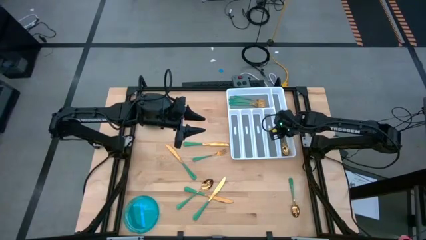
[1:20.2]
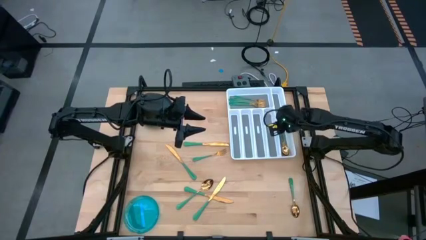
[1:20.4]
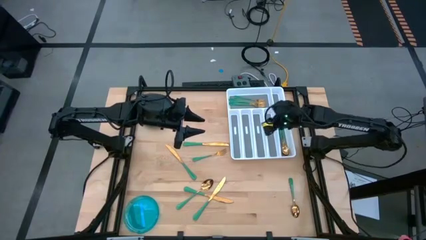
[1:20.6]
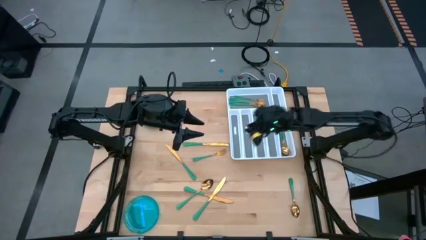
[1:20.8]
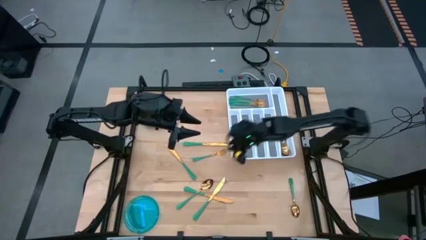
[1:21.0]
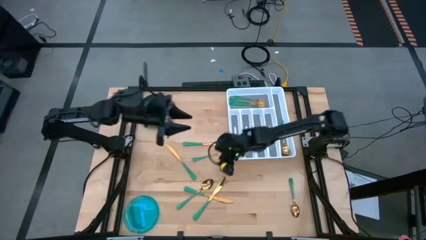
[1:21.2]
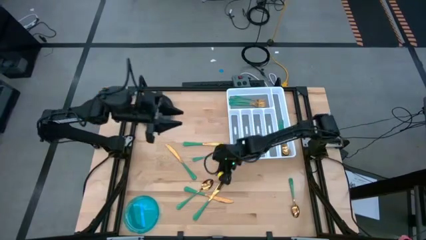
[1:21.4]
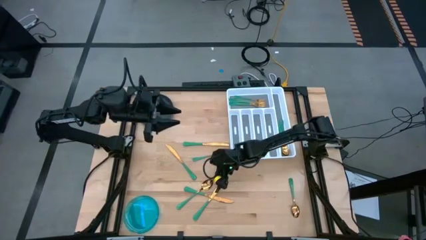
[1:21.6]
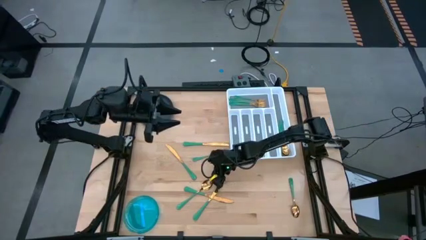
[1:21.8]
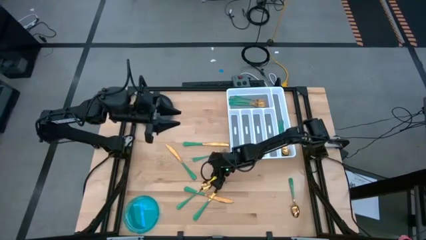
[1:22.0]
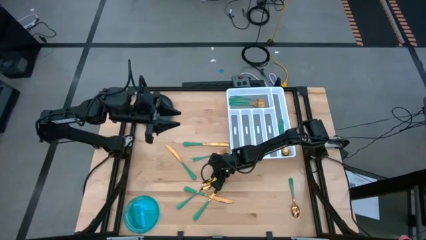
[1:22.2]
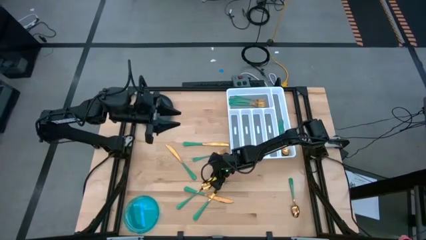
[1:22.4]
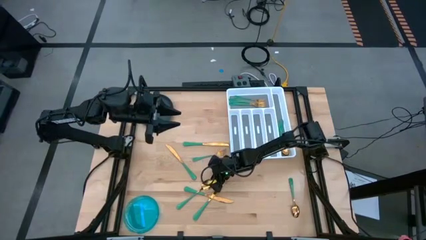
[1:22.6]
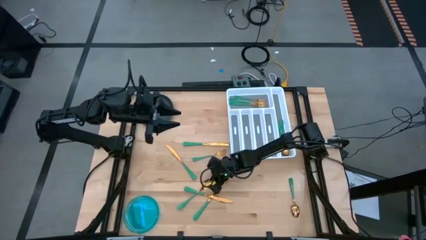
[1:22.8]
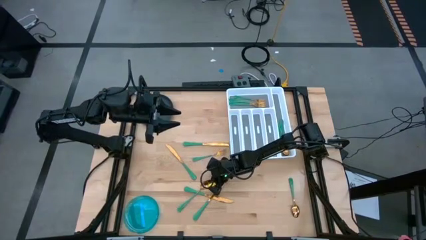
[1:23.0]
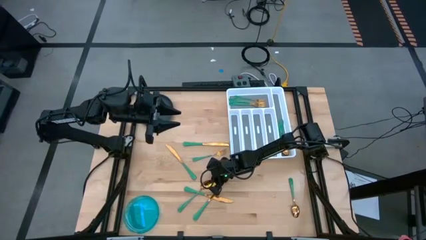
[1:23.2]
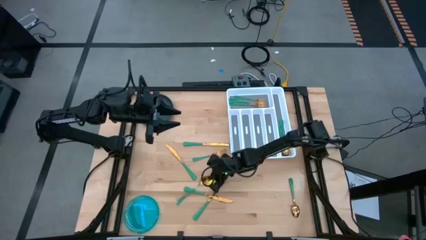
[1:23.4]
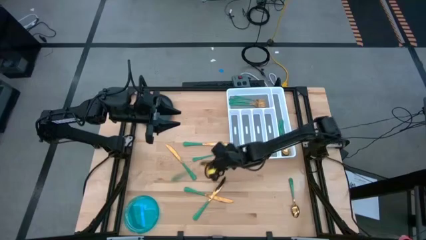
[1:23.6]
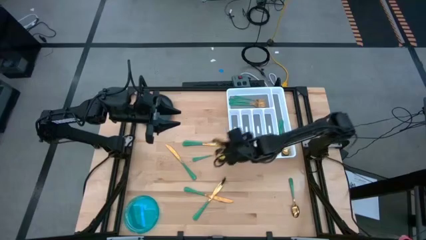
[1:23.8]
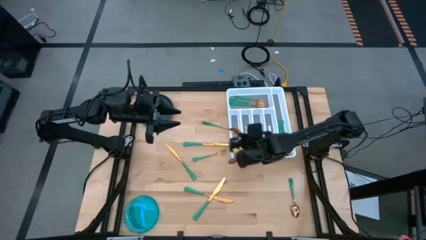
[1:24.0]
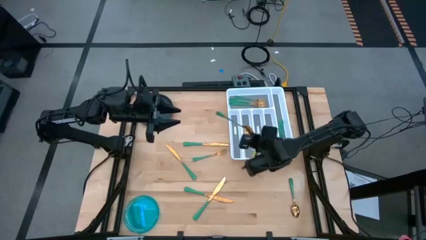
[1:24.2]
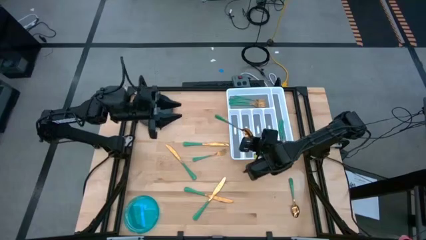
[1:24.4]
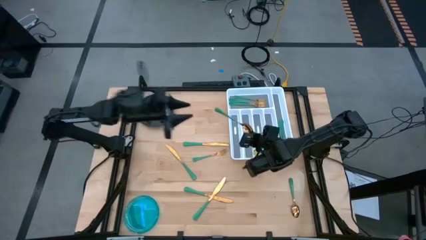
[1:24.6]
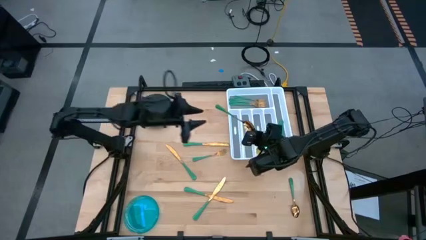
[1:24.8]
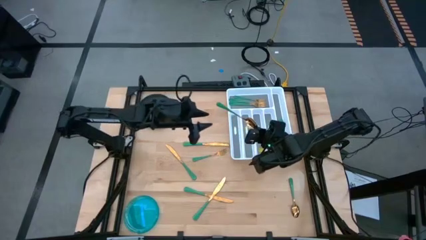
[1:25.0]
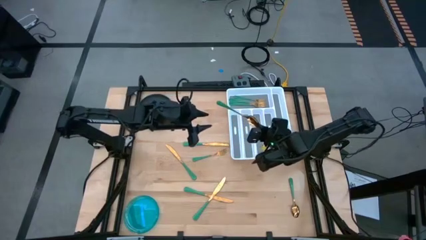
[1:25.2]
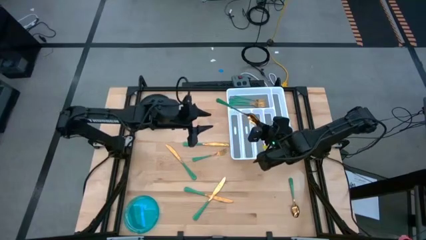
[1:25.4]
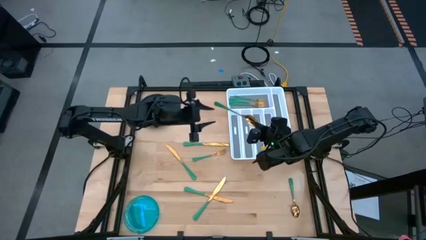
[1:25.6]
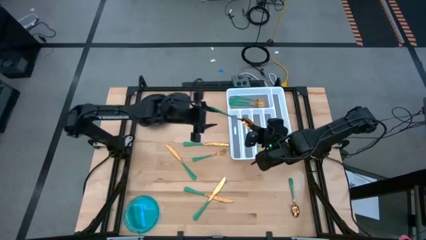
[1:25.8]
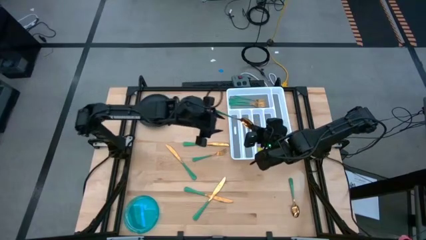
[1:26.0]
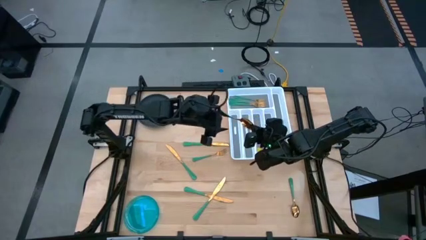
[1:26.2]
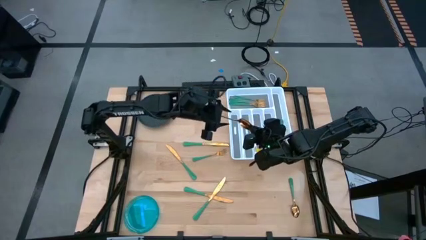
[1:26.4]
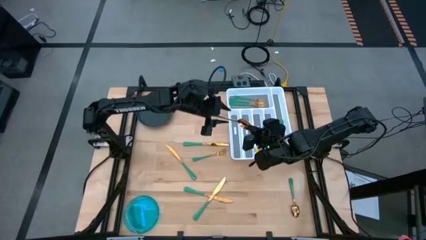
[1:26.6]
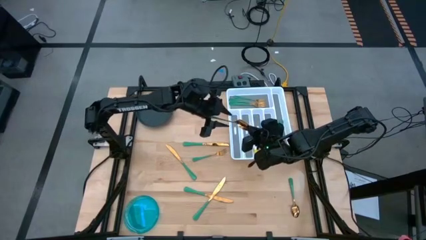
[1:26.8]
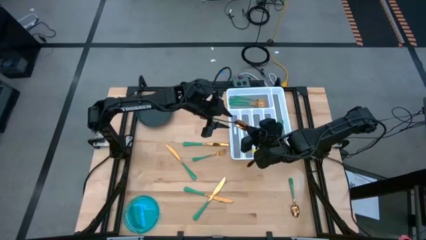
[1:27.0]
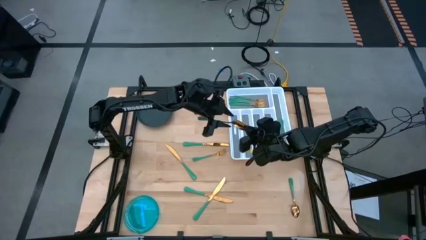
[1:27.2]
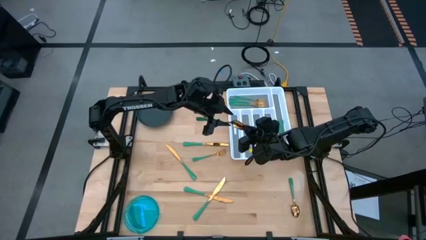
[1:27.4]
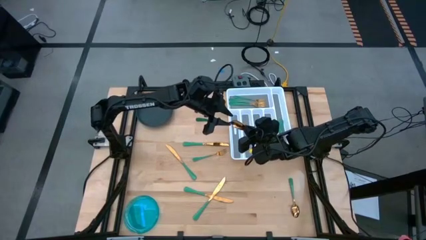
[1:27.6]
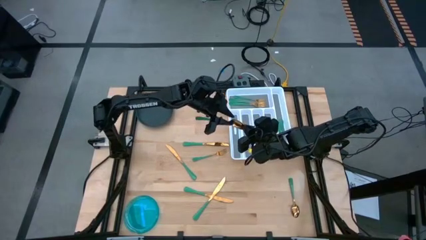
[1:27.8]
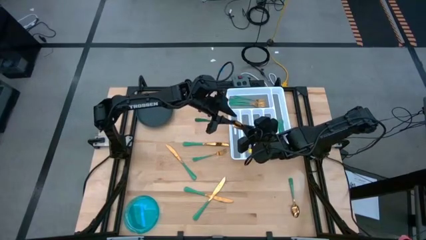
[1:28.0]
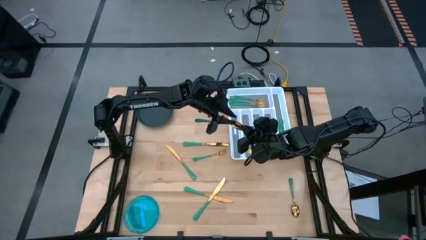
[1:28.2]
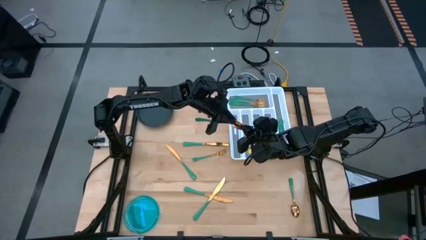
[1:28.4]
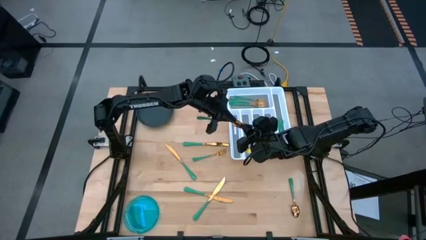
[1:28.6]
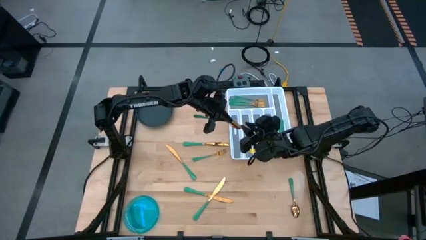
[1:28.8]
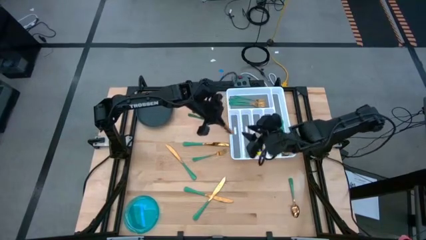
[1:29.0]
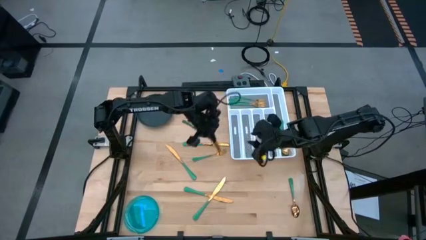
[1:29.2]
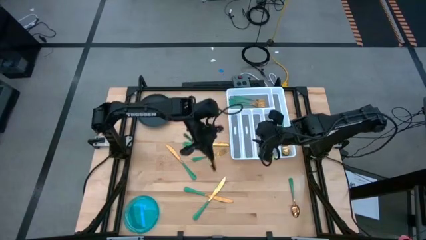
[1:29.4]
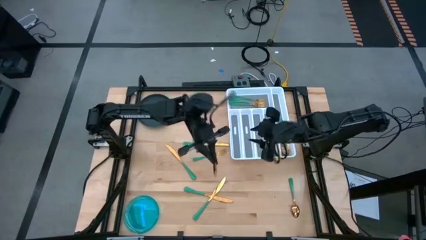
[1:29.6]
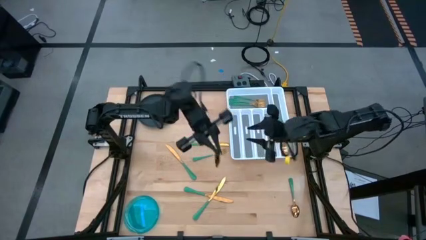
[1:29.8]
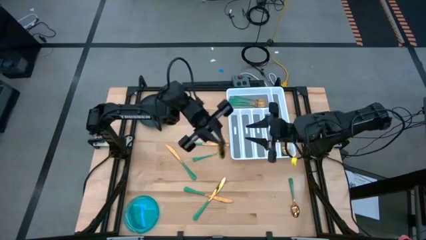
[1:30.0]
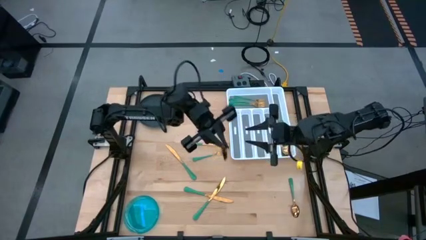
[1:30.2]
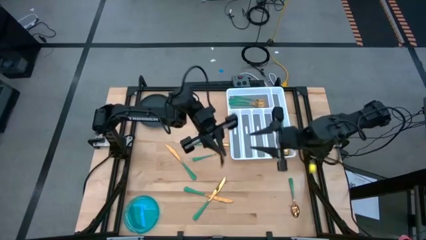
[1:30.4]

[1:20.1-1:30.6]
Task: Sort silverware
Put the green spoon into the silverware tray
